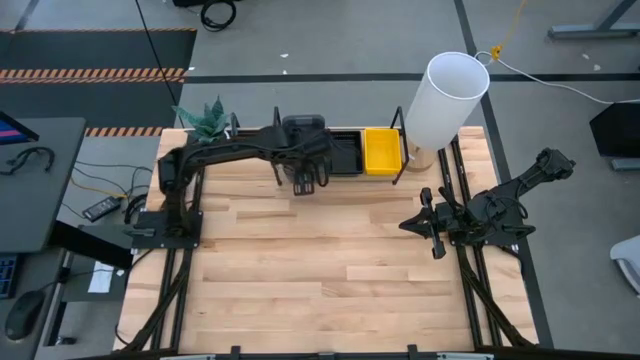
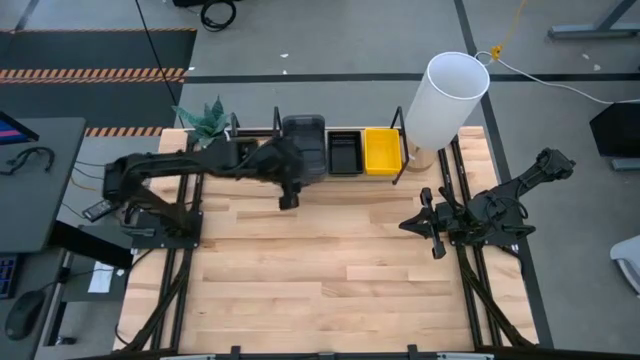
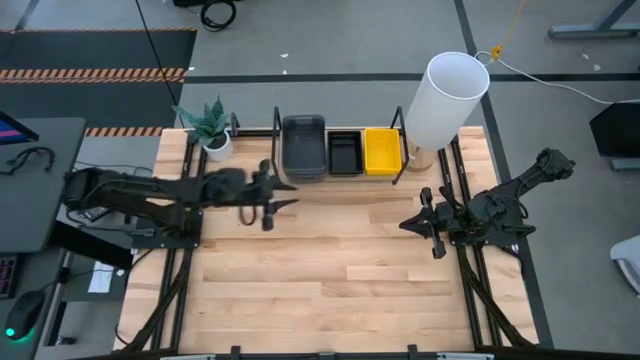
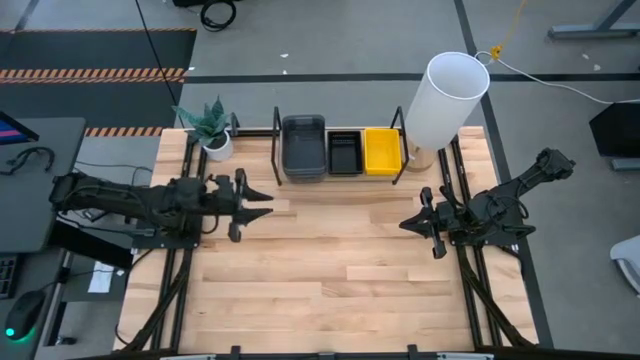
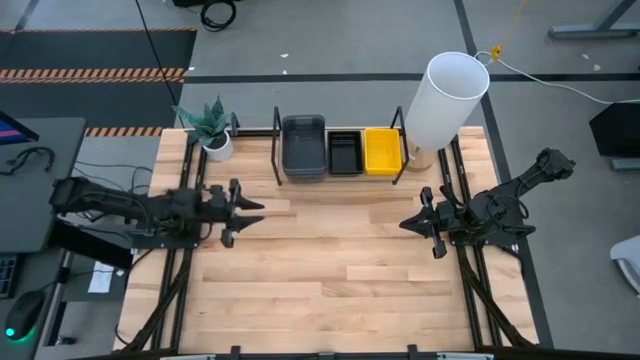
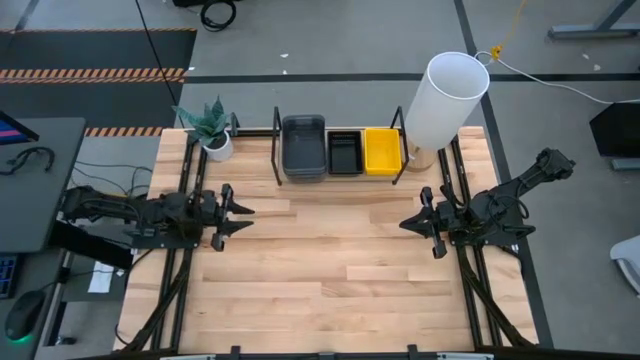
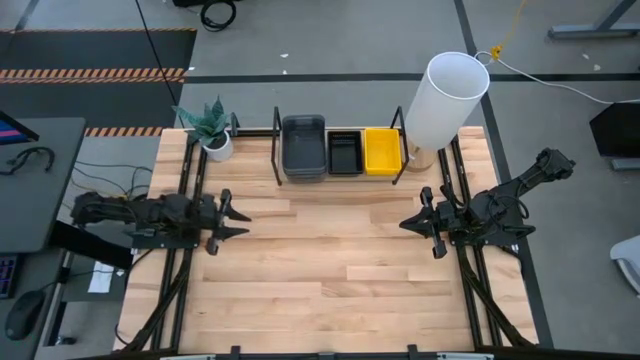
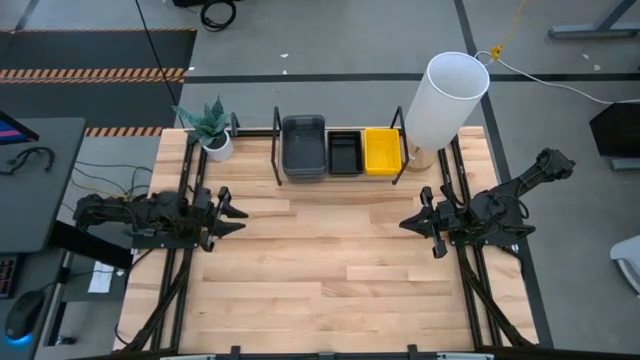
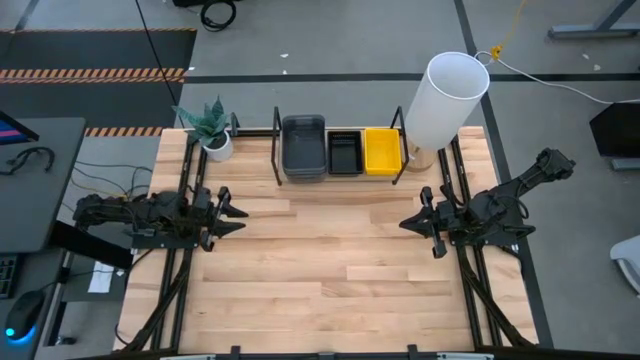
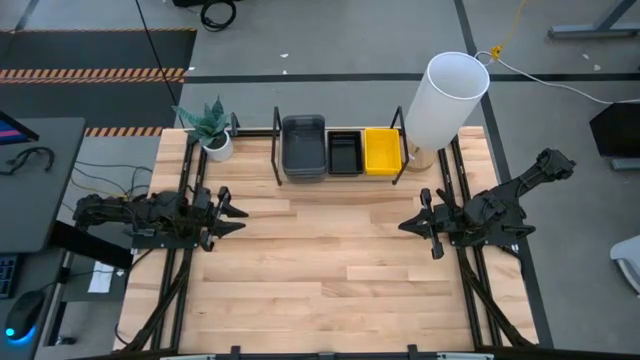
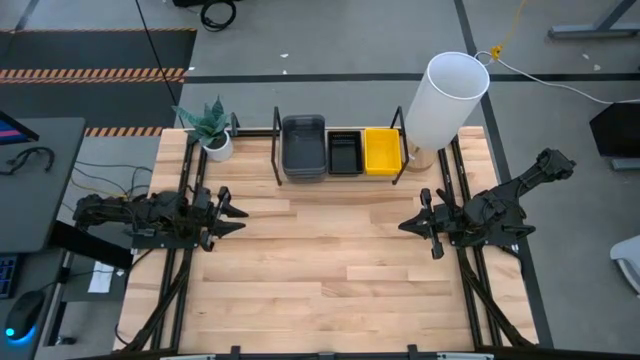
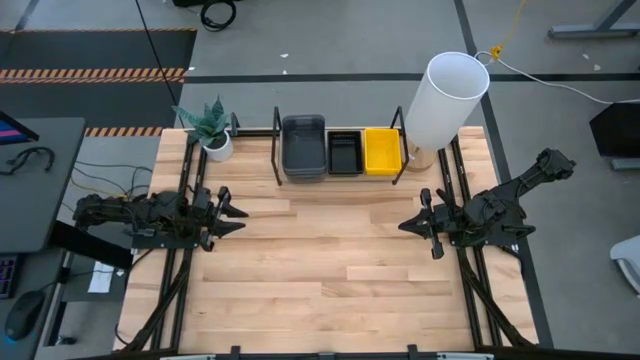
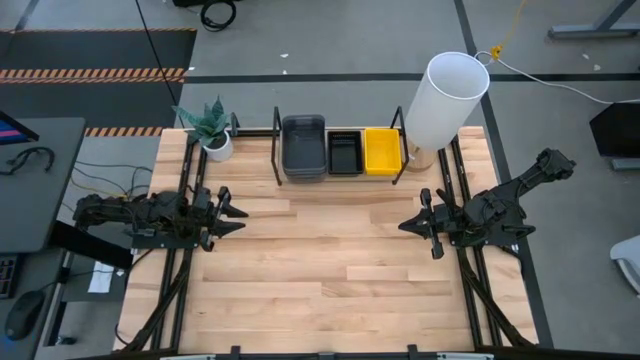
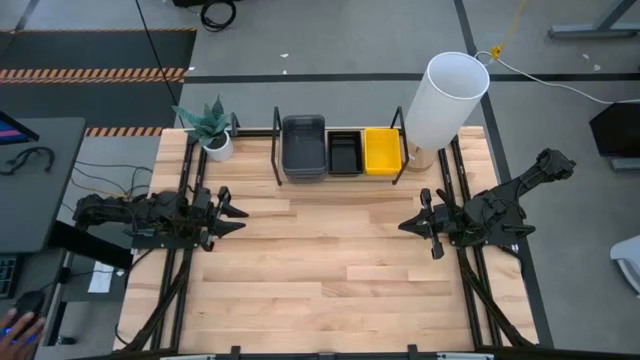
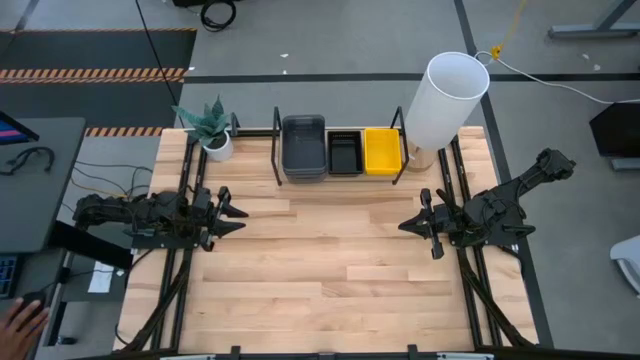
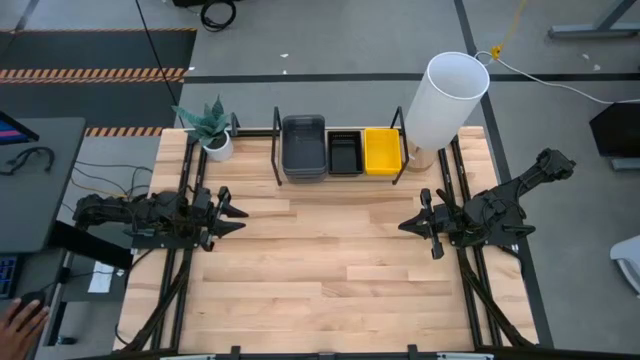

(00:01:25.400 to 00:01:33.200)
Task: Stack baskets on shelf by color
Return to Home Position

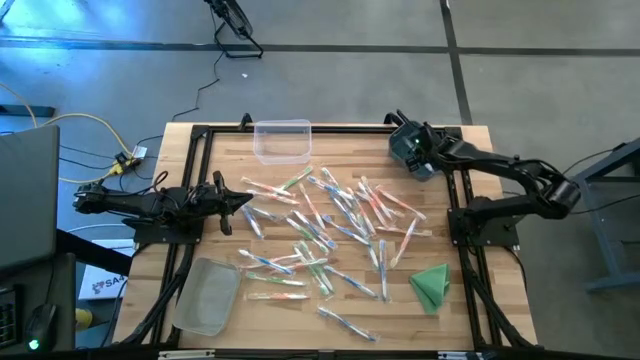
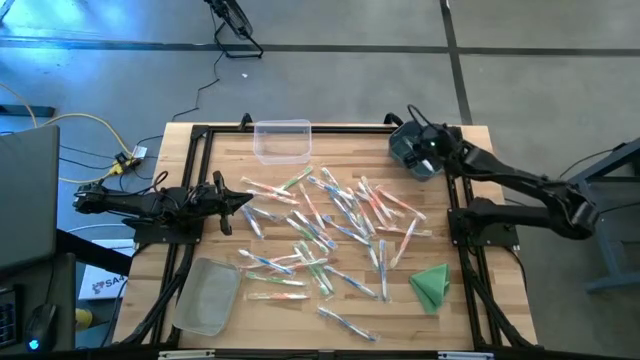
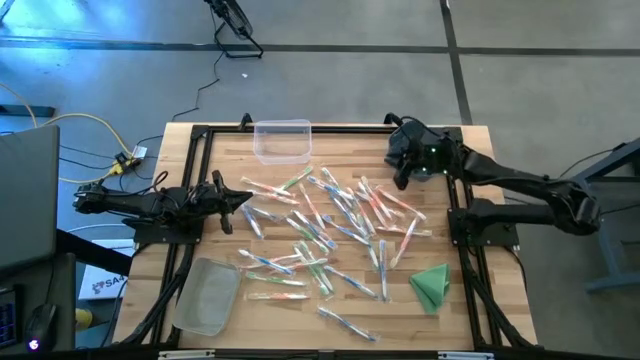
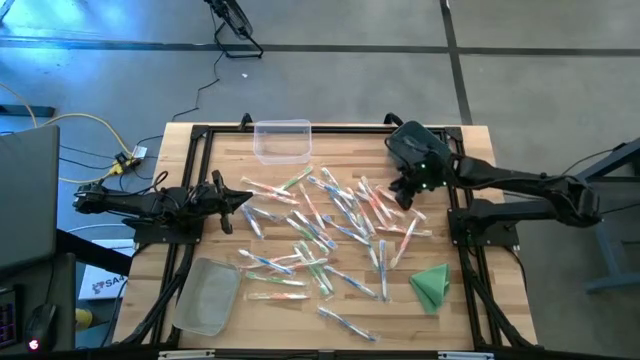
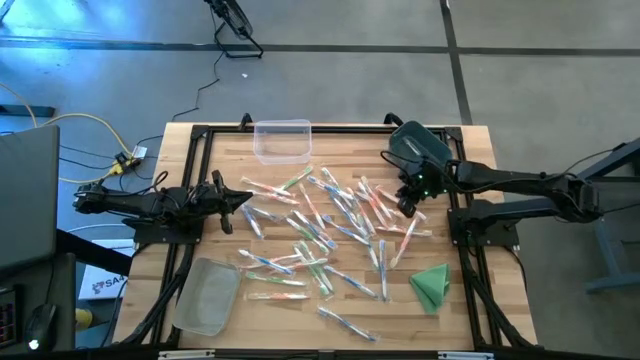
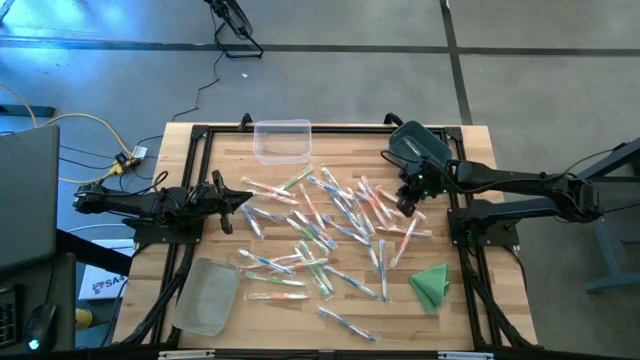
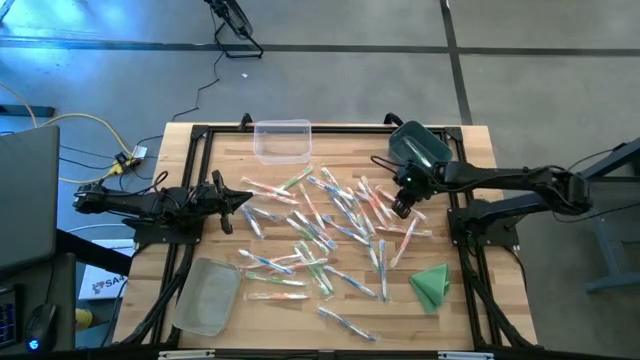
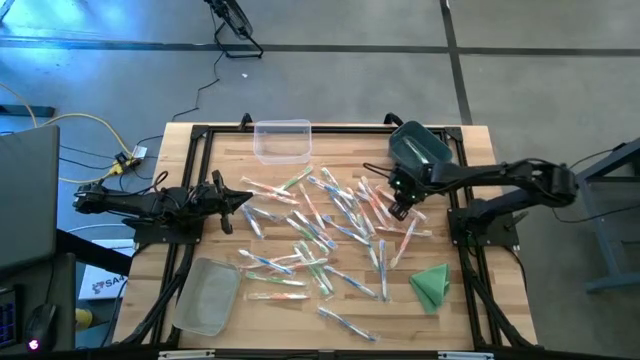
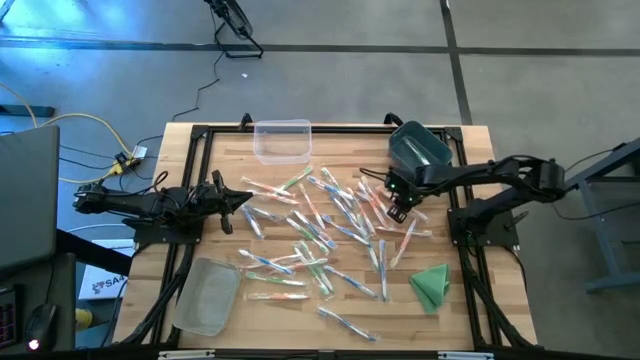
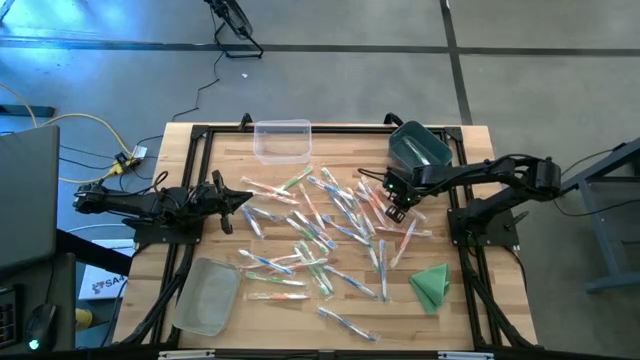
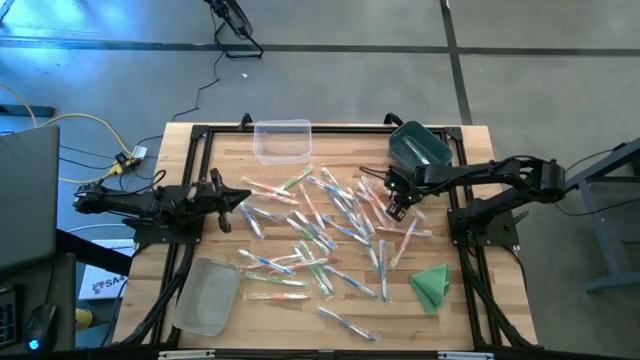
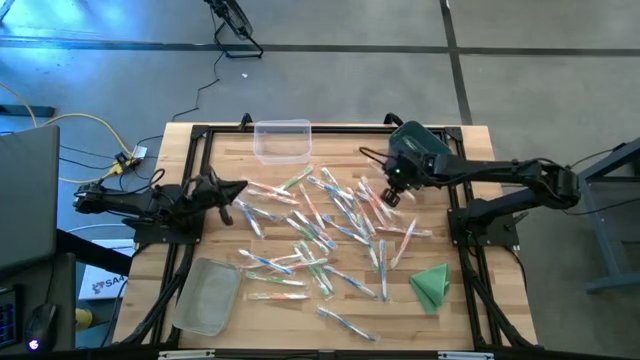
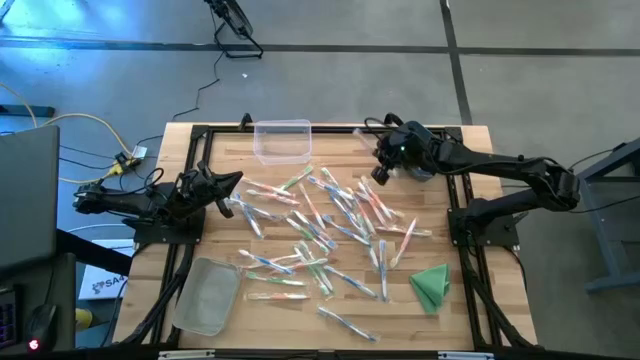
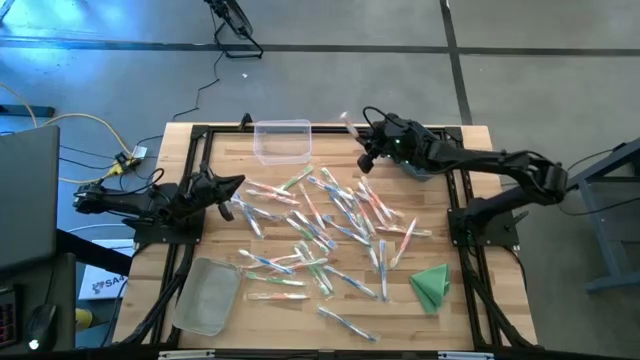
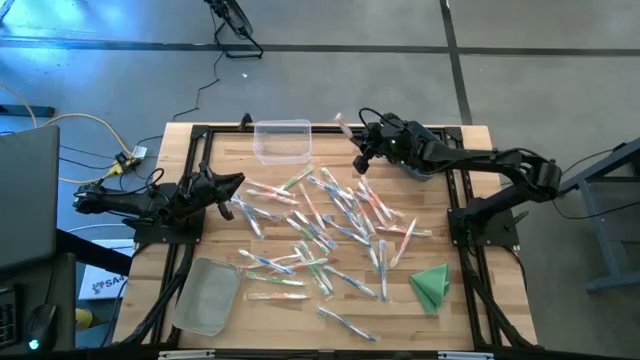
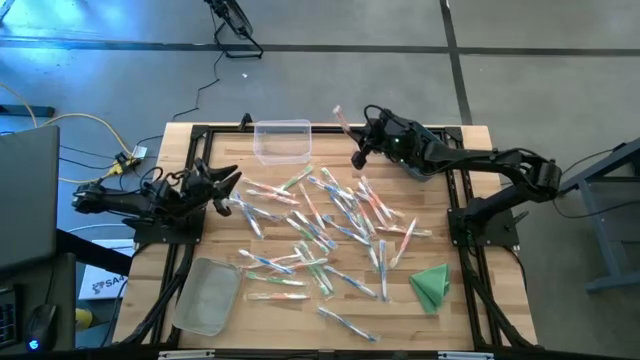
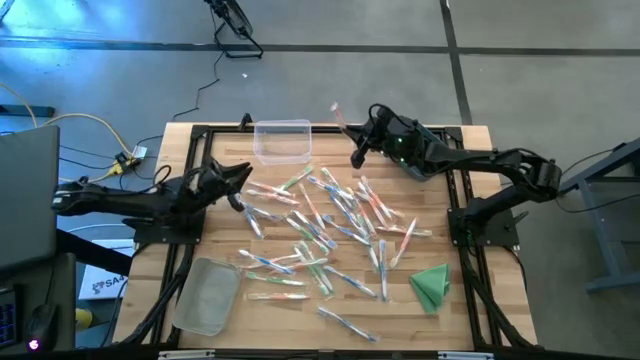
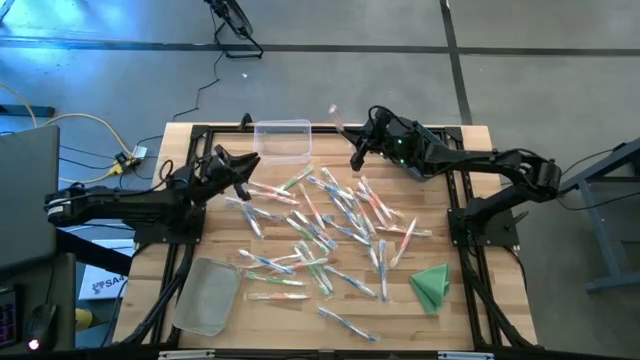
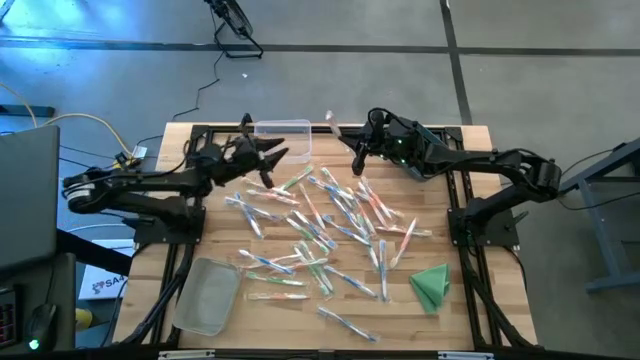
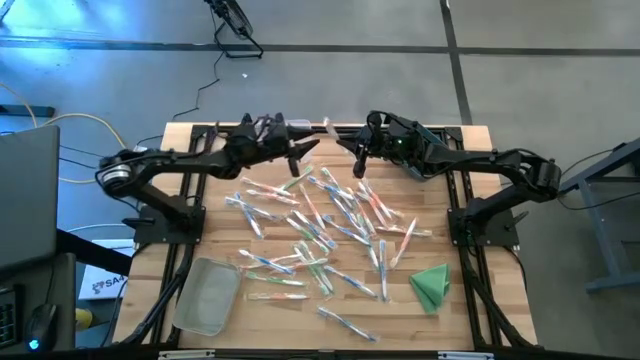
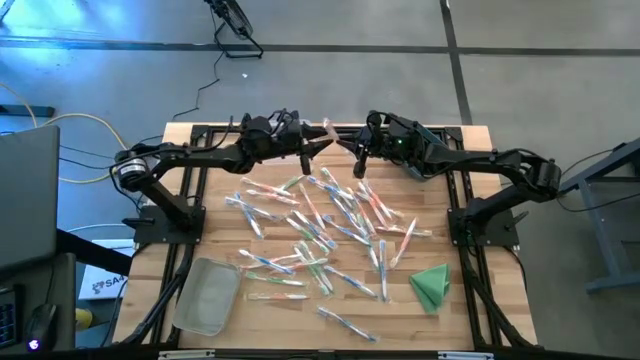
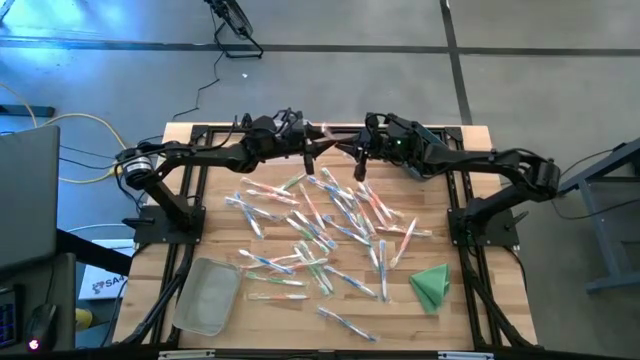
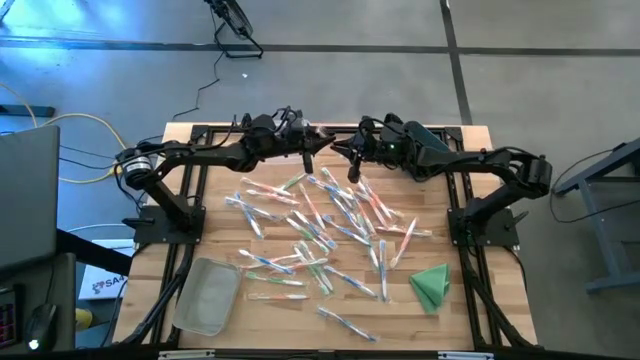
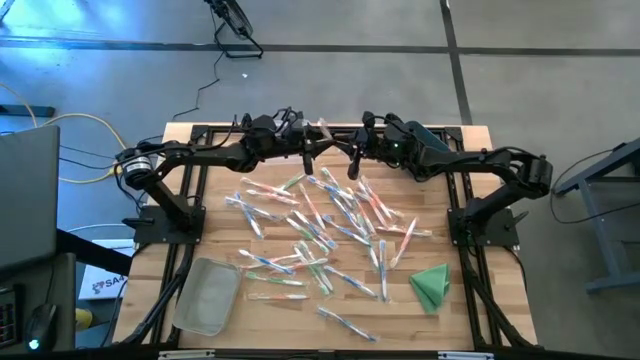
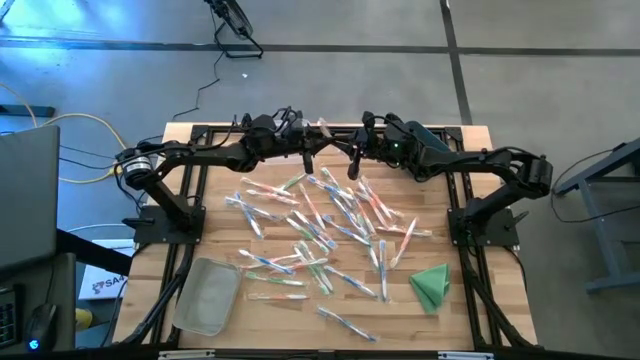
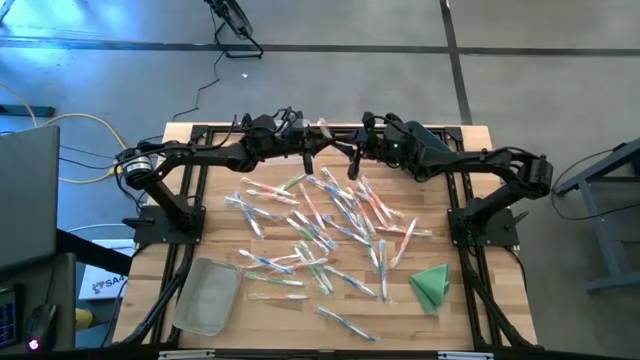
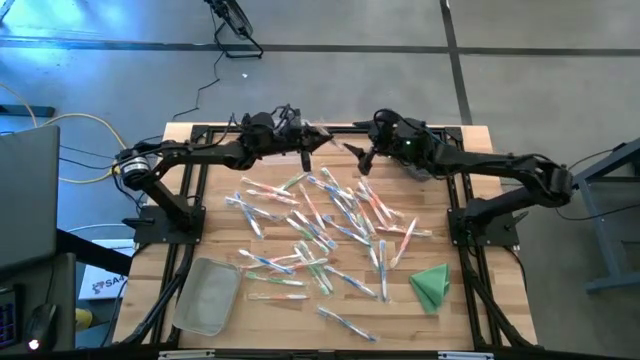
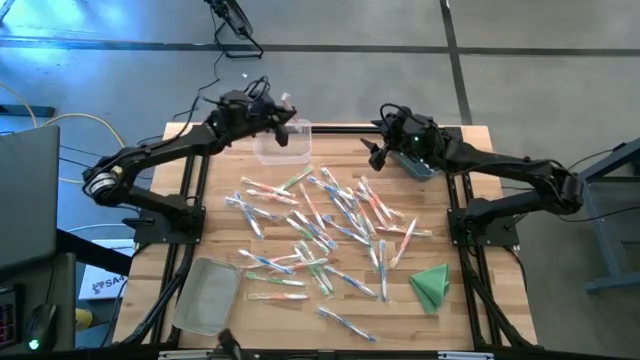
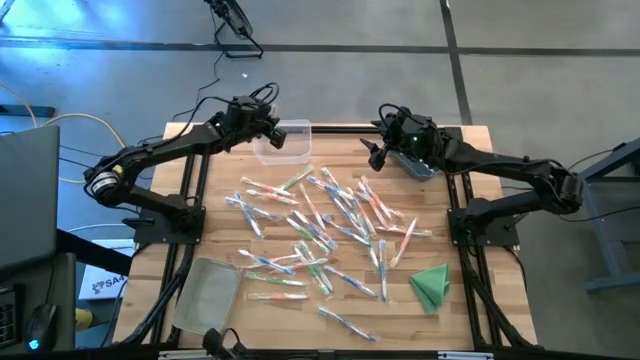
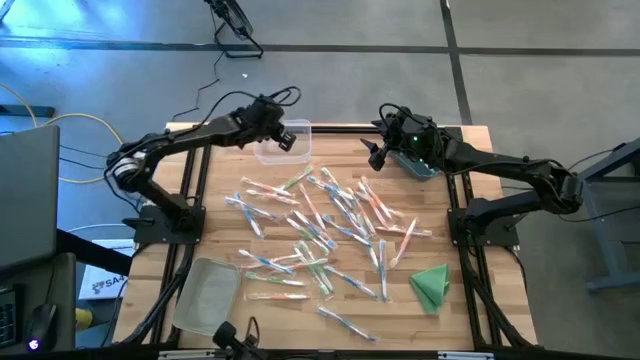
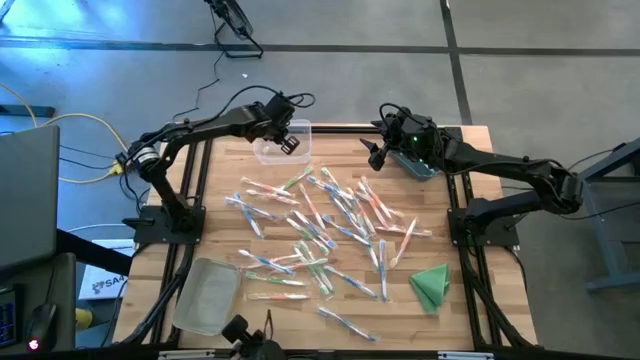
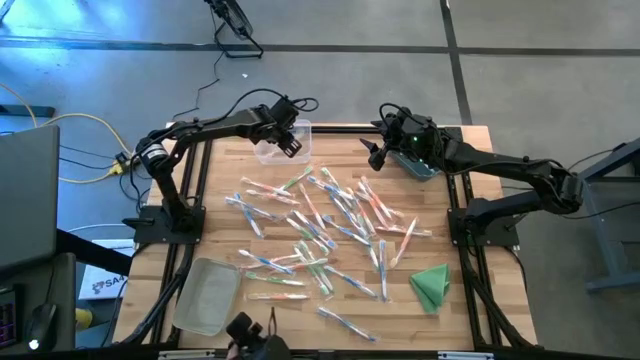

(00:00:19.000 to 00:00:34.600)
Task: Pick & Place Toothbrushes
Put the orange toothbrush into the transparent bin
